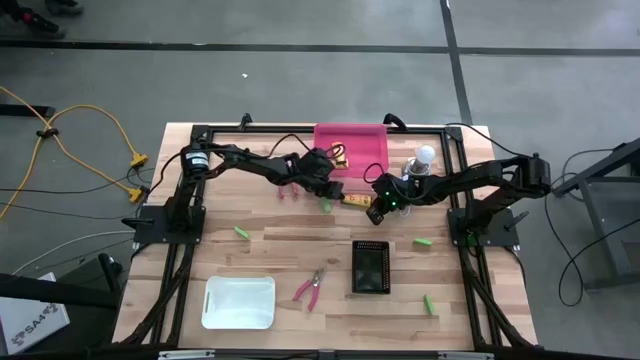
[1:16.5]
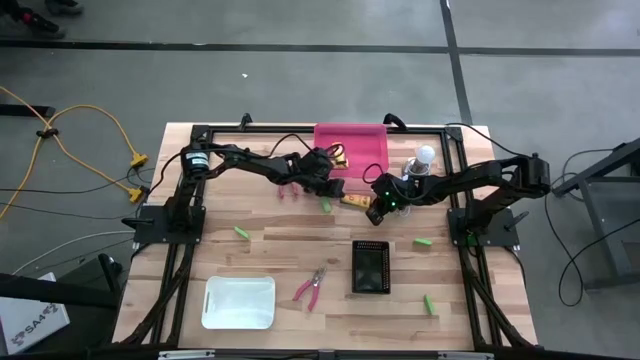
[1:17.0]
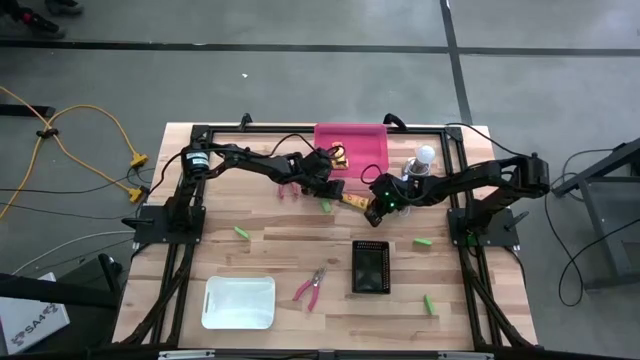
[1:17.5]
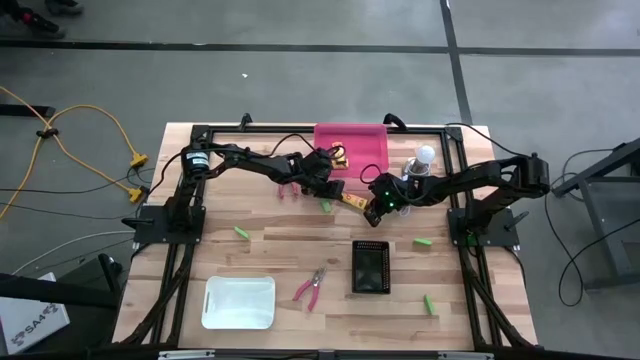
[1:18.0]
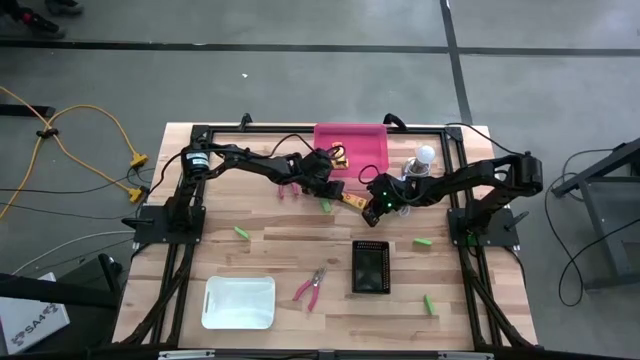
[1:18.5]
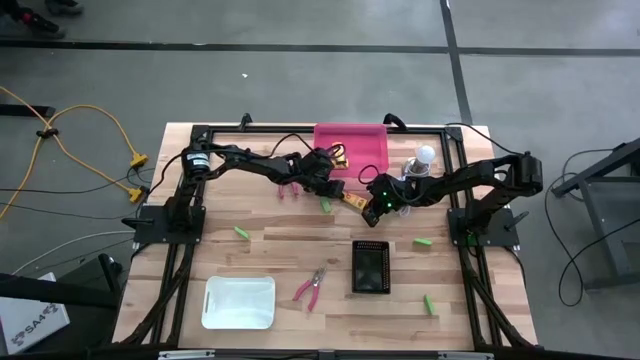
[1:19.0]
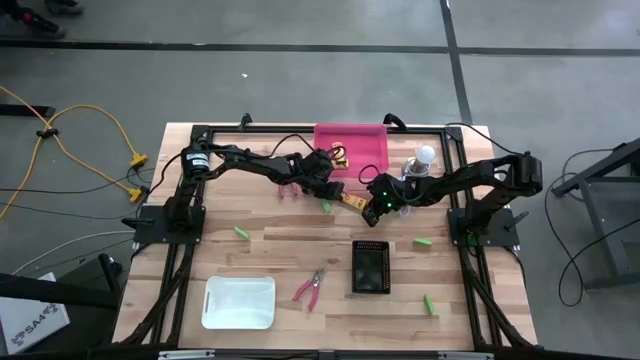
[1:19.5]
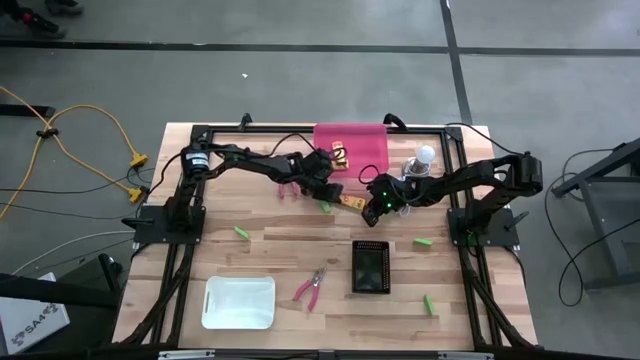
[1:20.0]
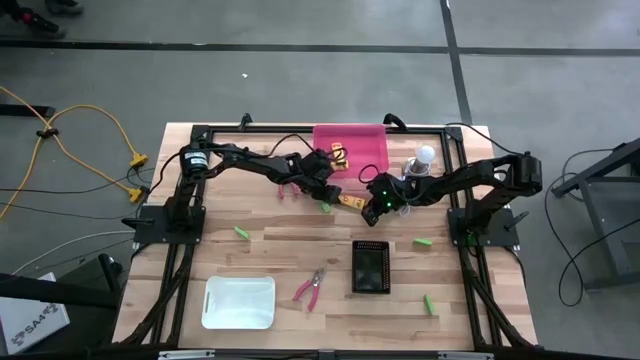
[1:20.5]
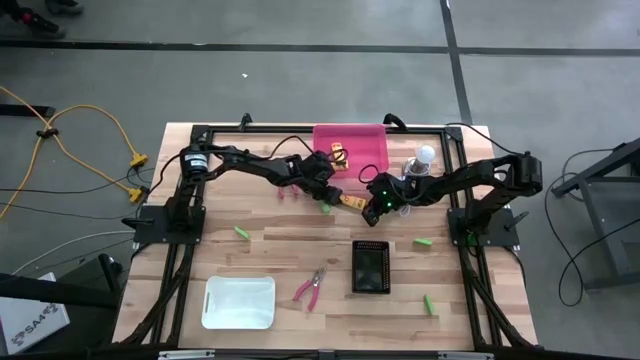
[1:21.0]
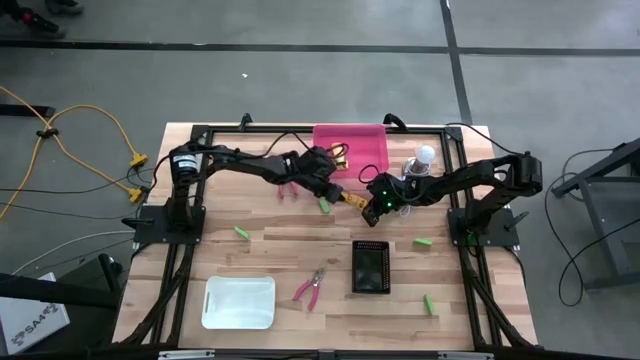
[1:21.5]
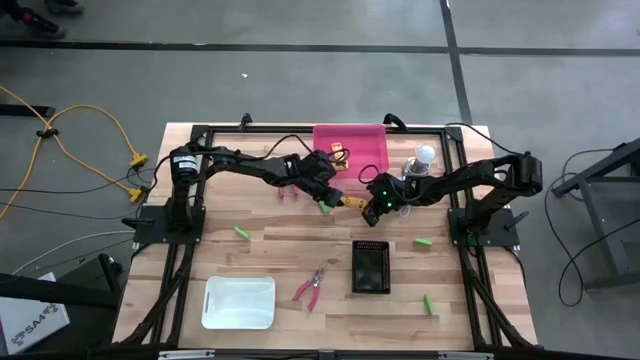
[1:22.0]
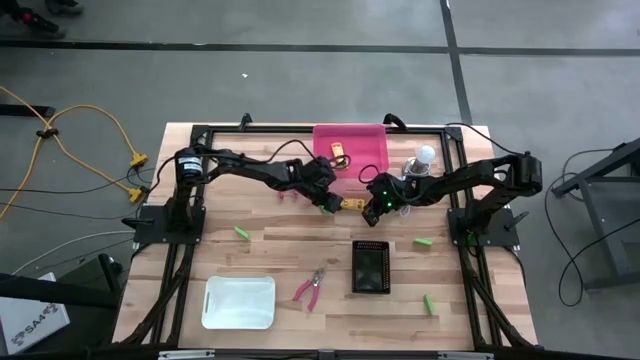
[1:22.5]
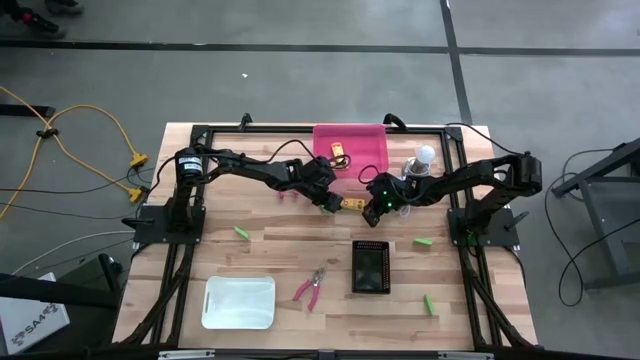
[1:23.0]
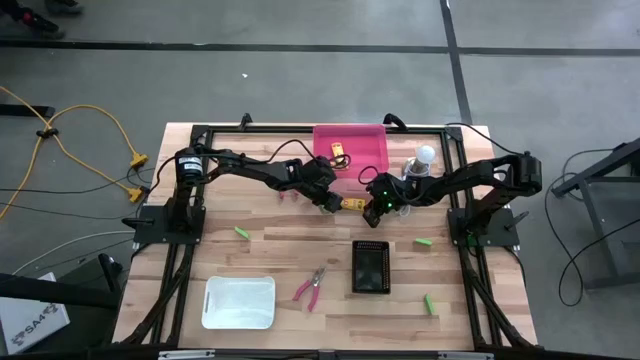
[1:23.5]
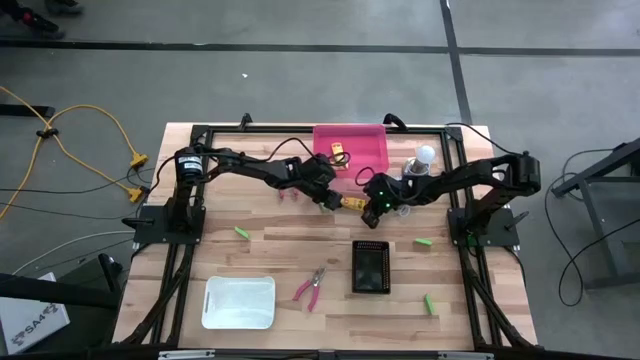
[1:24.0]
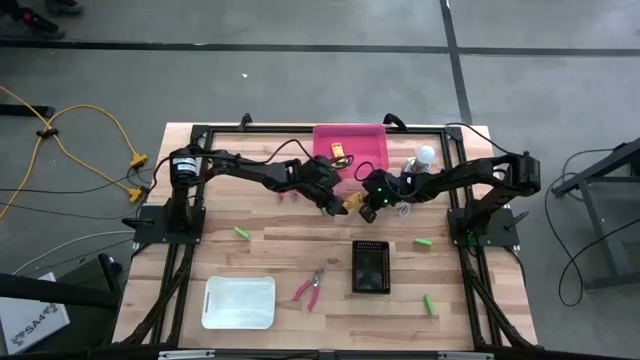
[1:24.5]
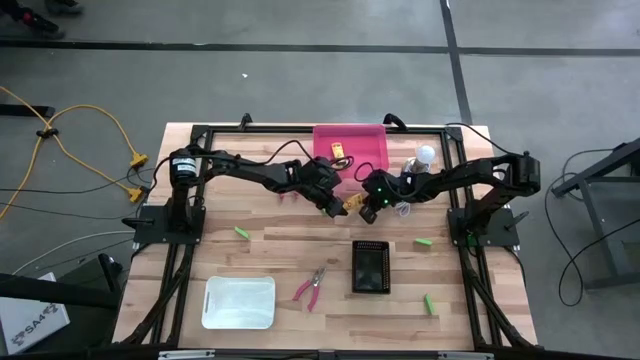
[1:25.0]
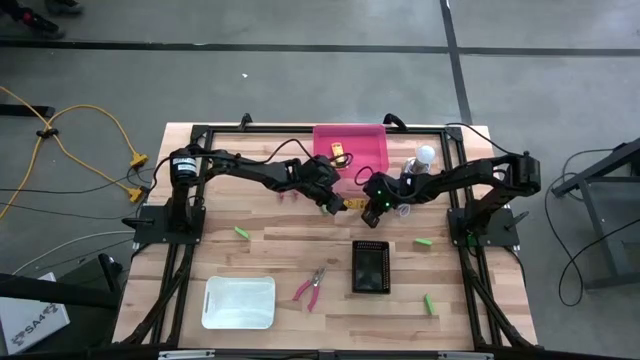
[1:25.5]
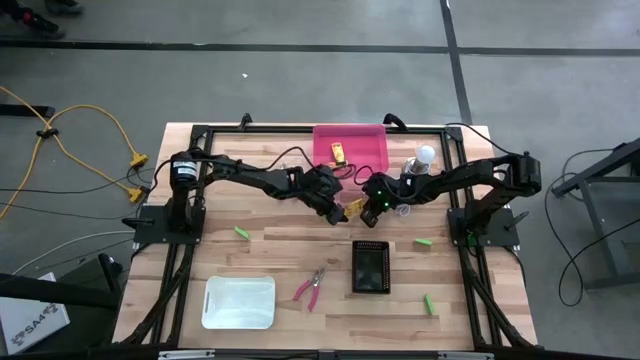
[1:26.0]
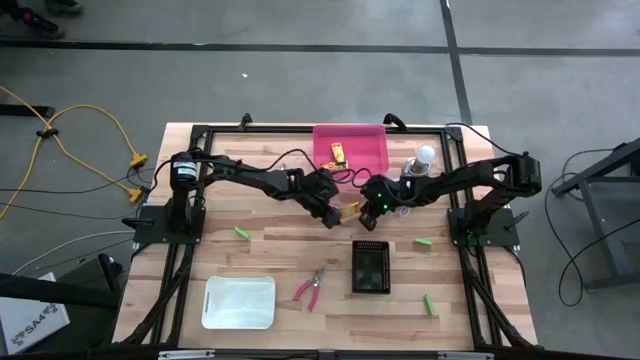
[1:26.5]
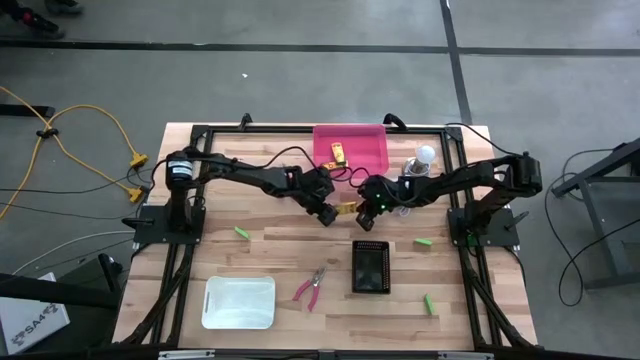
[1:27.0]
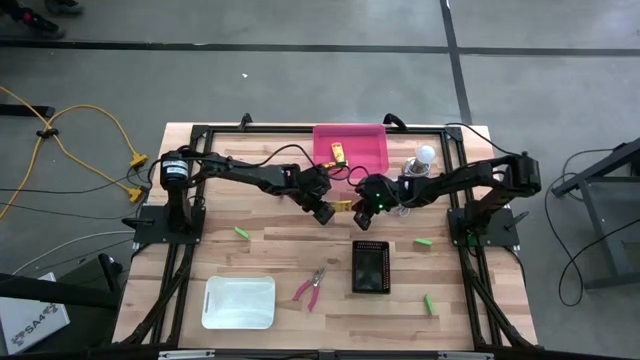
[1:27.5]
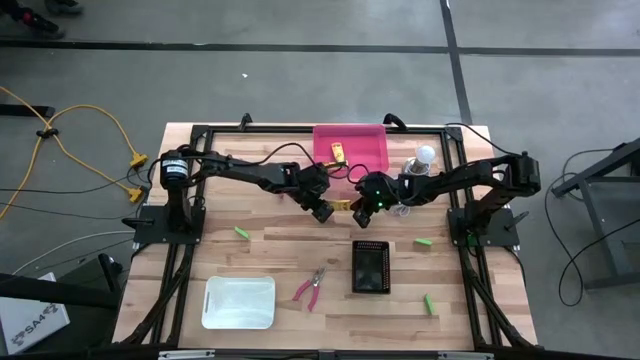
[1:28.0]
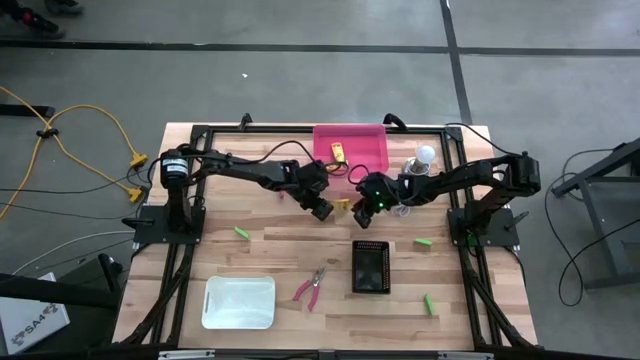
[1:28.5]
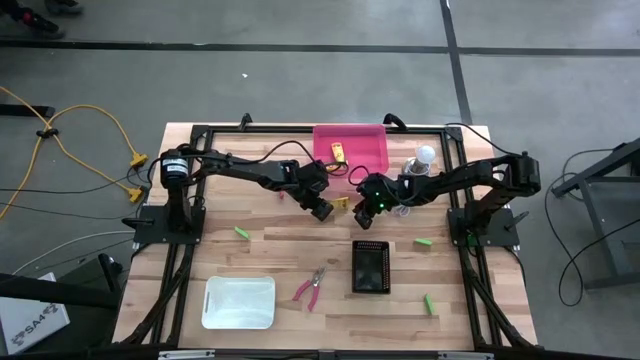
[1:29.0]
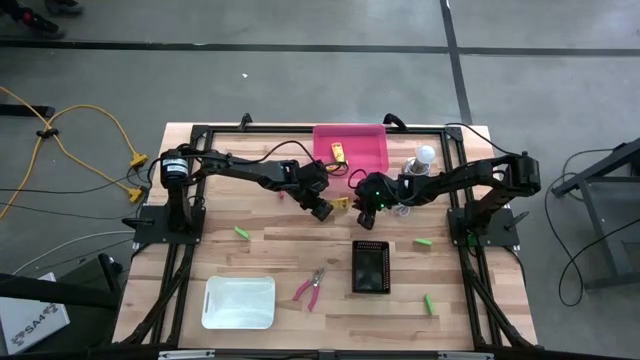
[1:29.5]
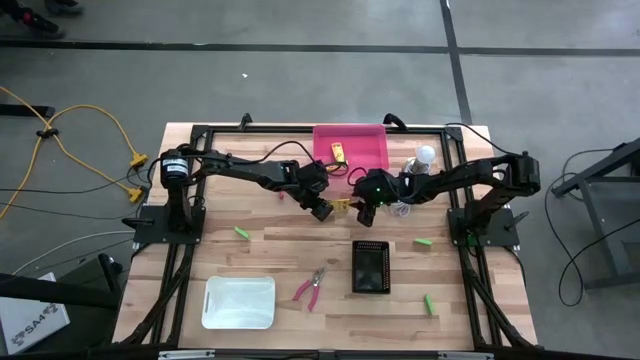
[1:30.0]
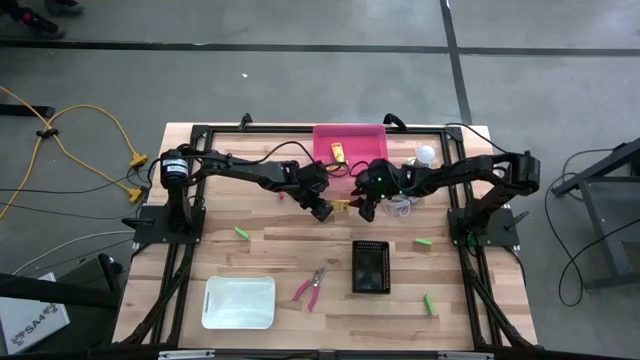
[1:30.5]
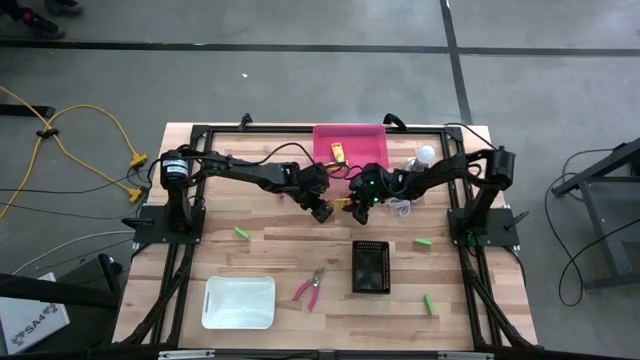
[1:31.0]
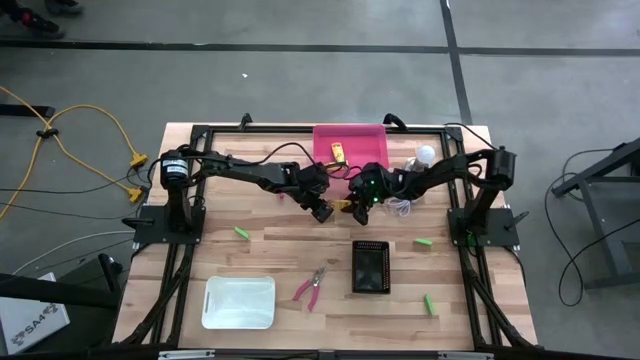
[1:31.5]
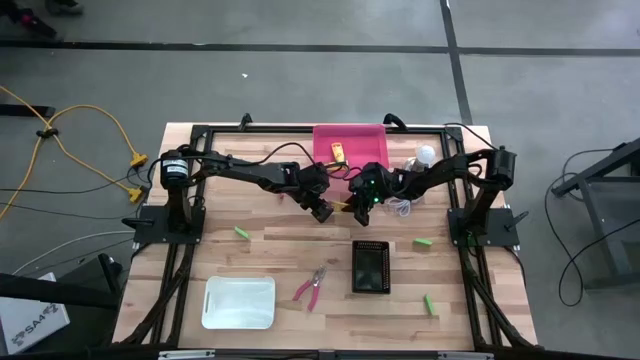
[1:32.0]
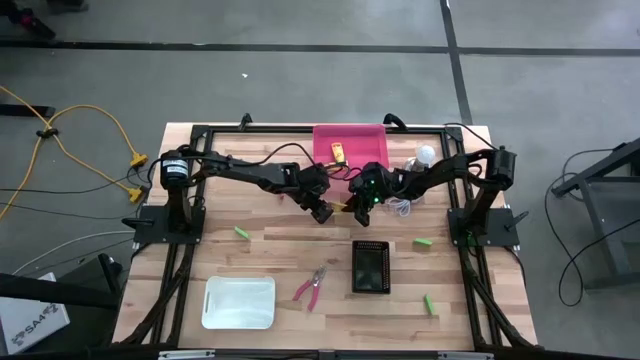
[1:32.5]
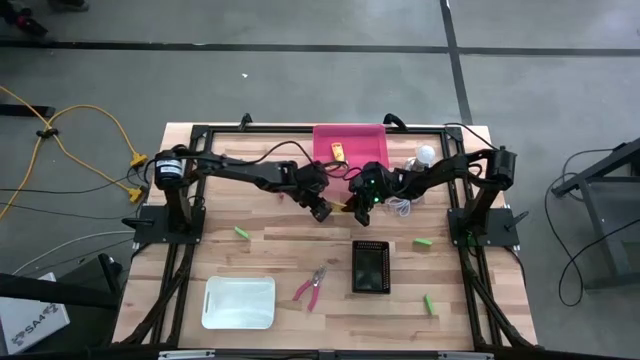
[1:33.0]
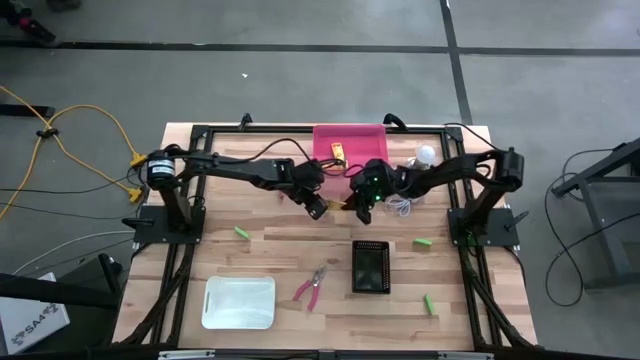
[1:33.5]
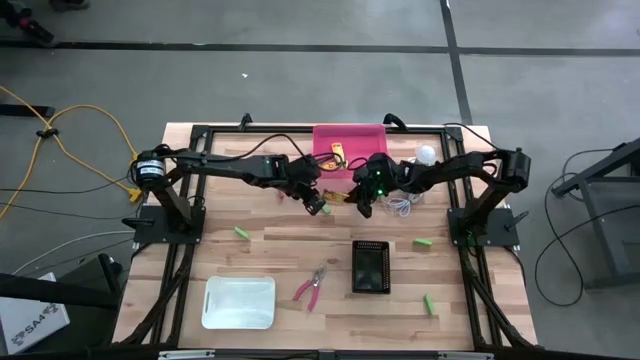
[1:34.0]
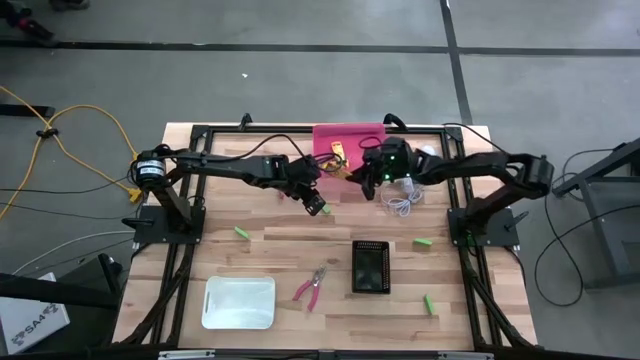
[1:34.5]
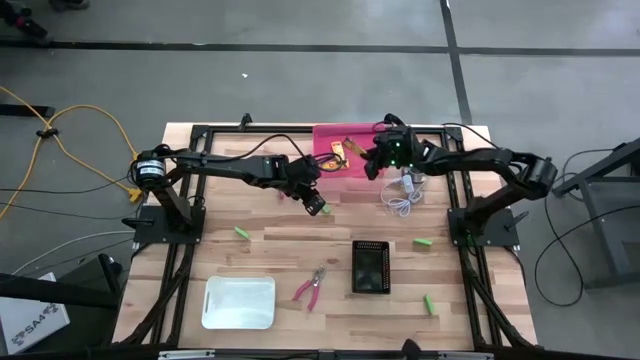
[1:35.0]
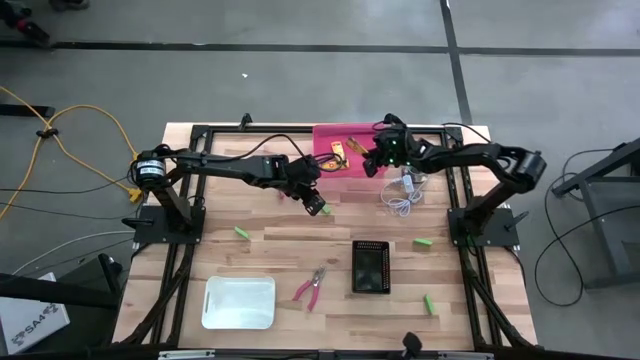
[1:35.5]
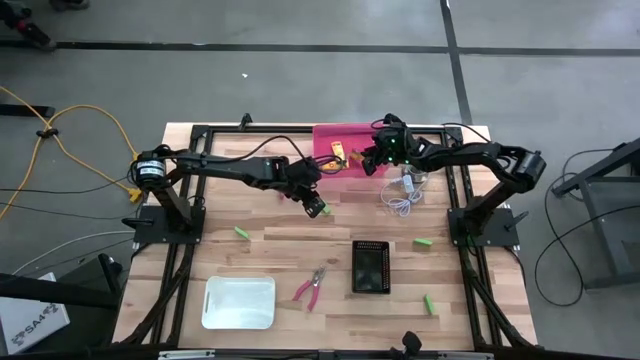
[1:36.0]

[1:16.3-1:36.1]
Task: Pick & Place School Supplies
Put the yellow crayon box into the pink bin

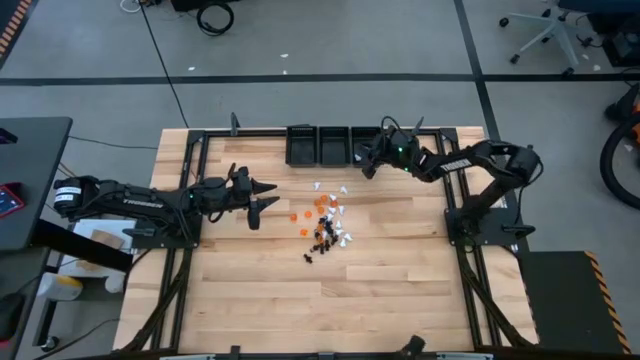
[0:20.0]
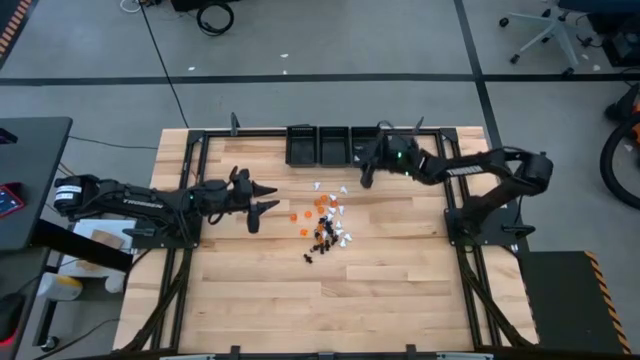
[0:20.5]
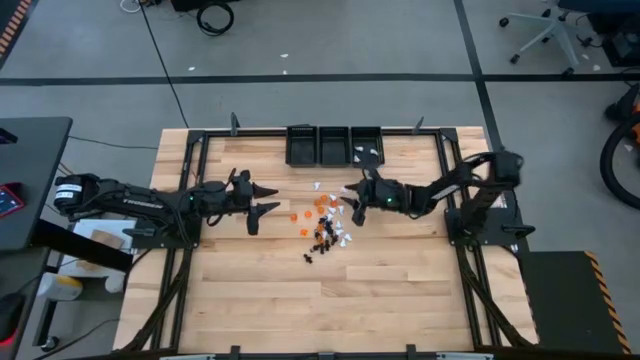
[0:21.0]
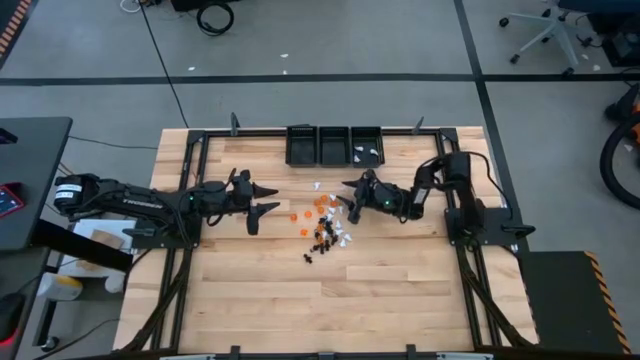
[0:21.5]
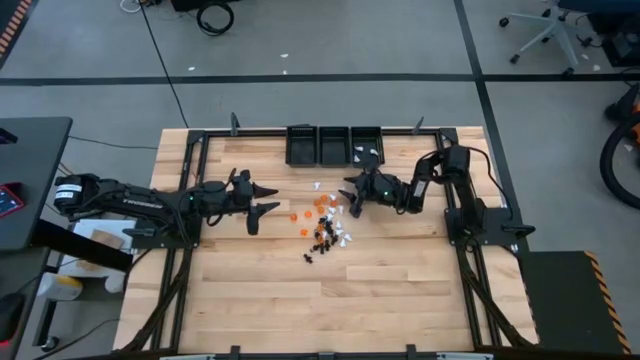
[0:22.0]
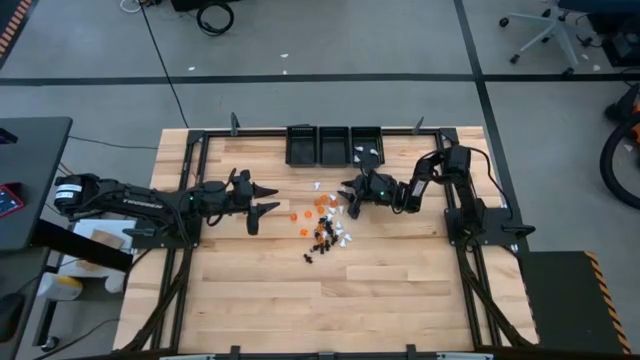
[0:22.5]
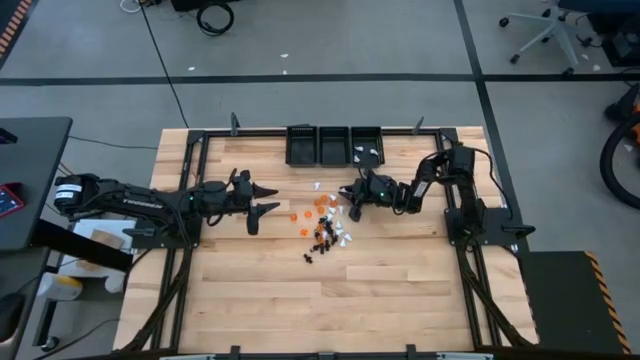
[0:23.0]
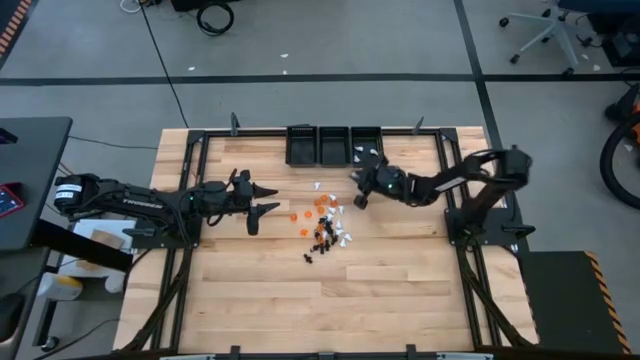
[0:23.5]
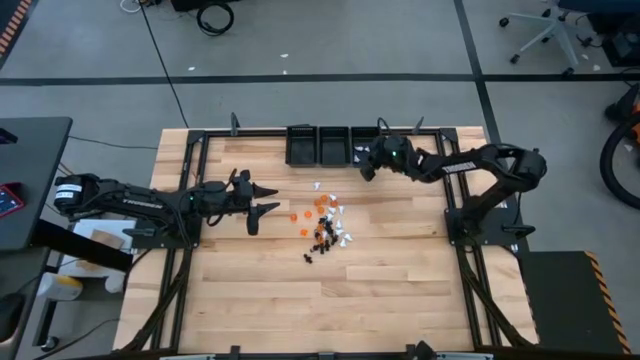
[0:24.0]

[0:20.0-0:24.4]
Task: Sort game pieces by color
Put the white game piece into the right black basket
